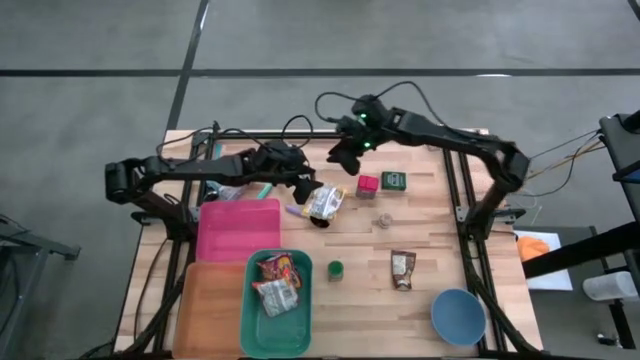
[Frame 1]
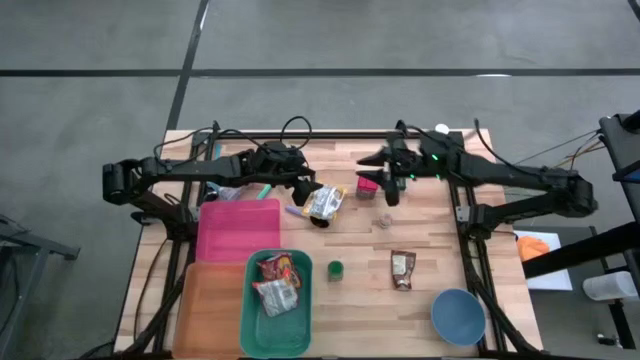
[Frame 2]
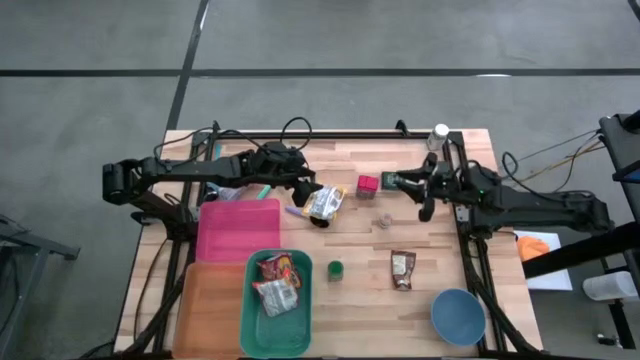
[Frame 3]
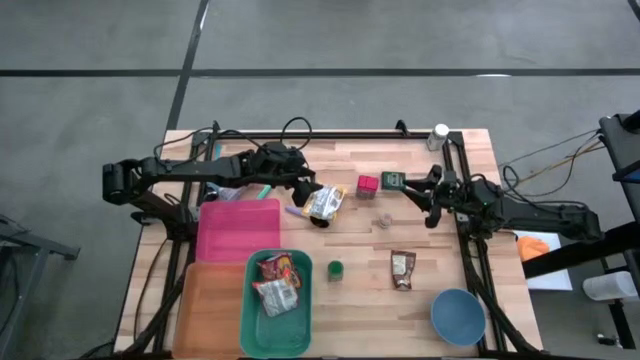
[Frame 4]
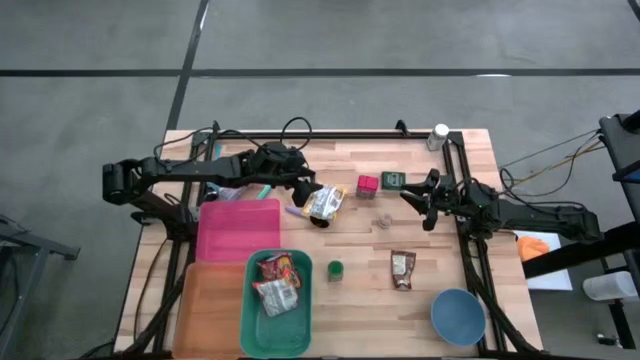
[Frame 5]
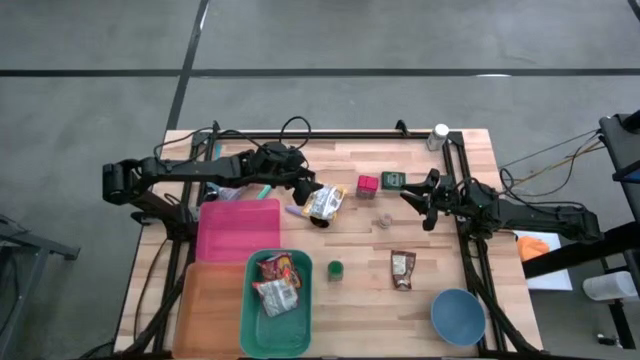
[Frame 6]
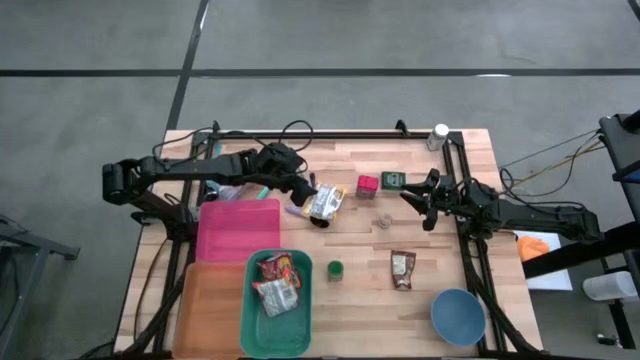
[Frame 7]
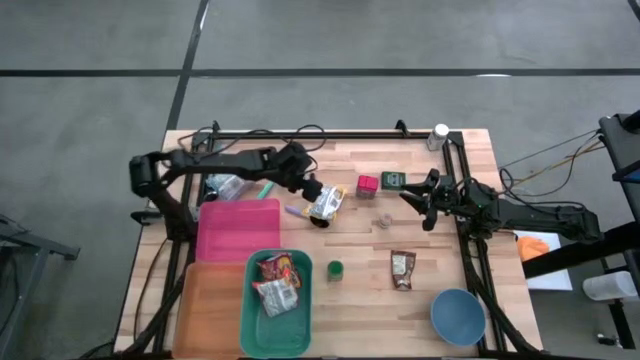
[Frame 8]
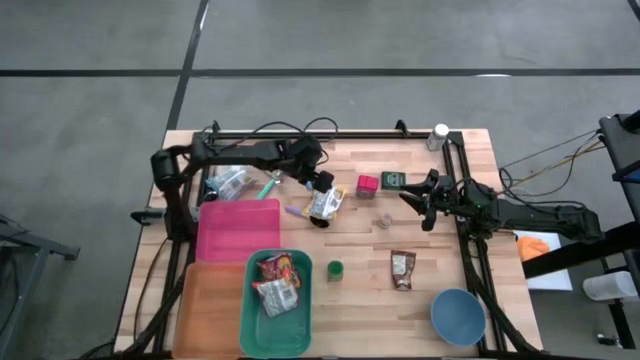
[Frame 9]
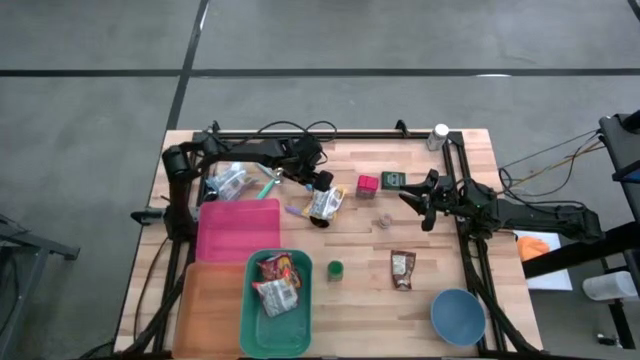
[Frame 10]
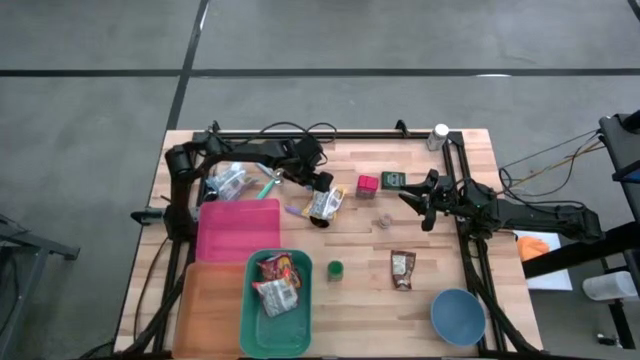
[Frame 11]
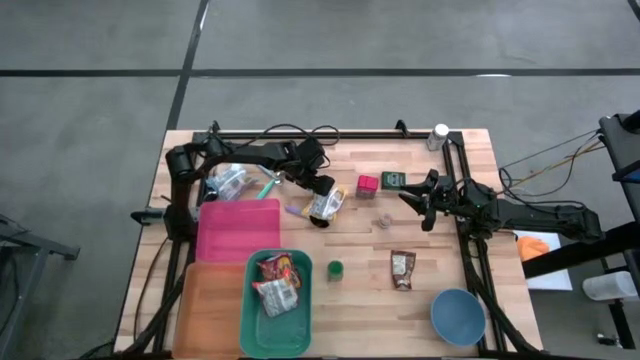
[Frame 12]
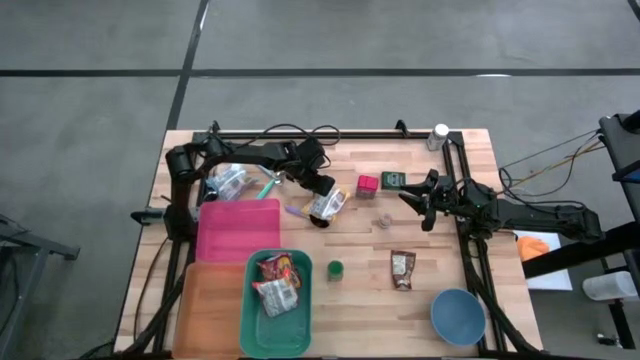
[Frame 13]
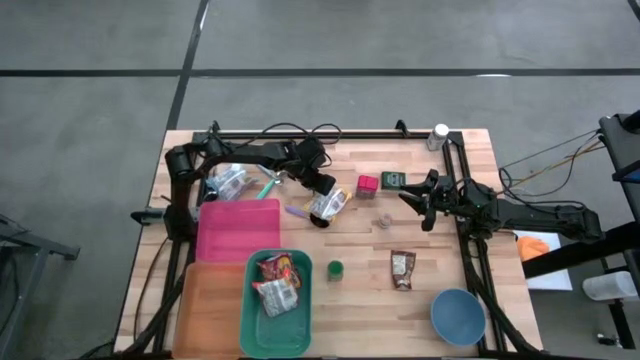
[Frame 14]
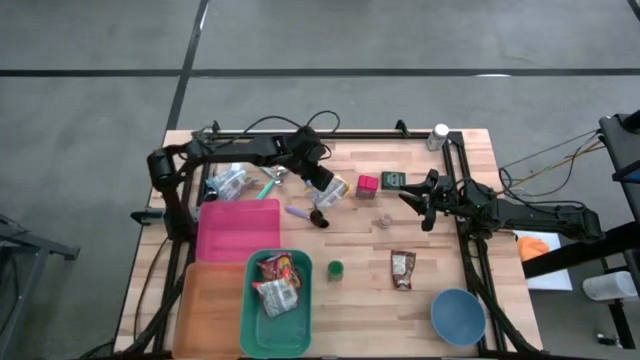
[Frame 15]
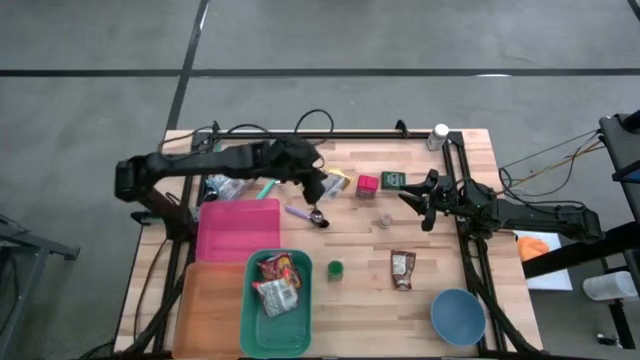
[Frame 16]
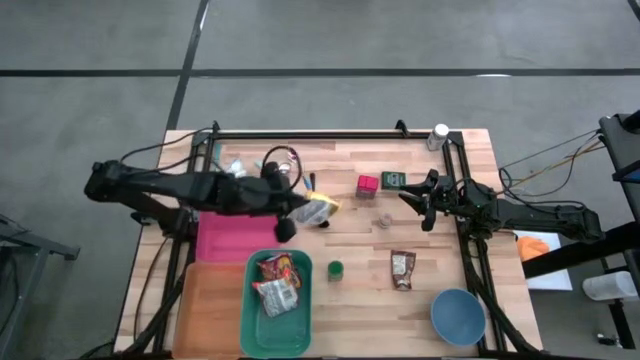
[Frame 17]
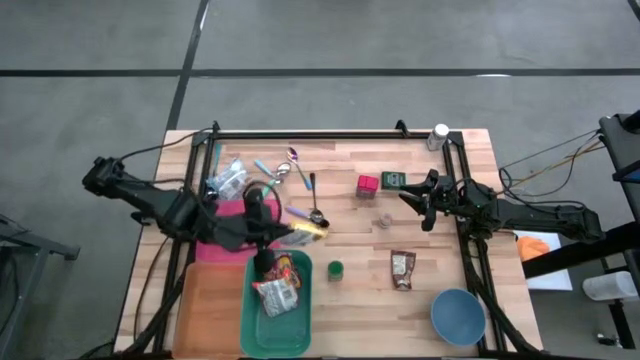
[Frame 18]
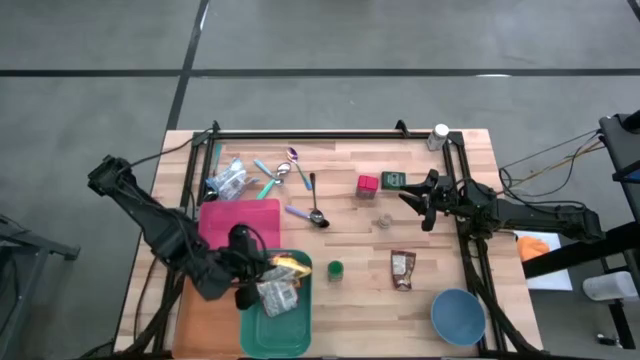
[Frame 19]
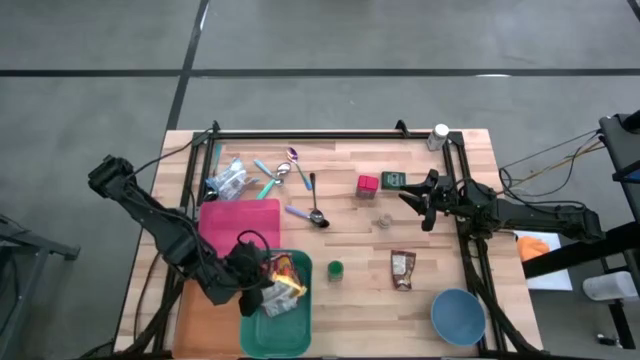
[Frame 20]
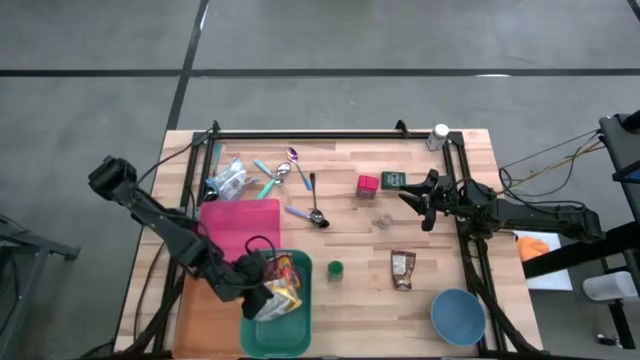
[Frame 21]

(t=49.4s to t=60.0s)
Put the yellow noodle pack into the green bin
